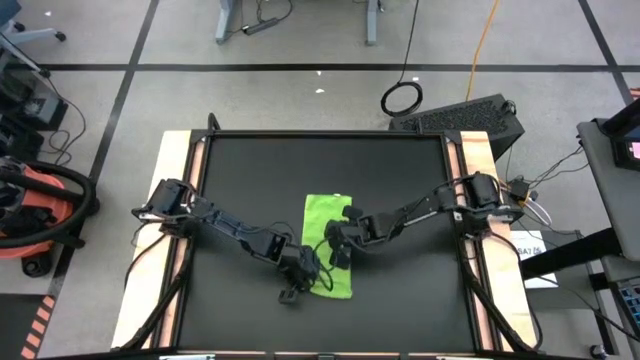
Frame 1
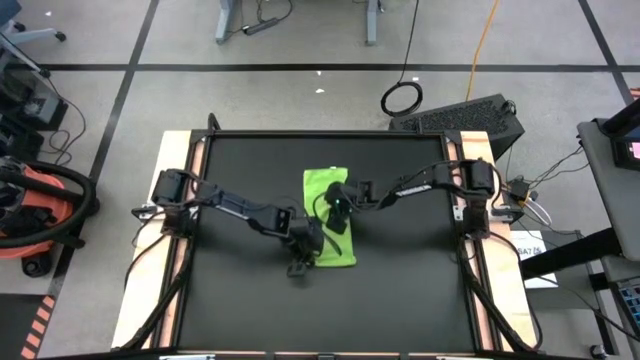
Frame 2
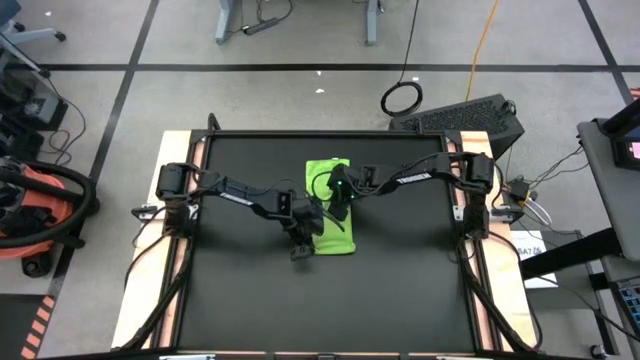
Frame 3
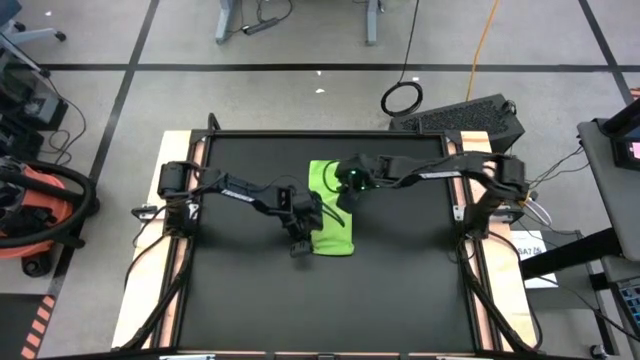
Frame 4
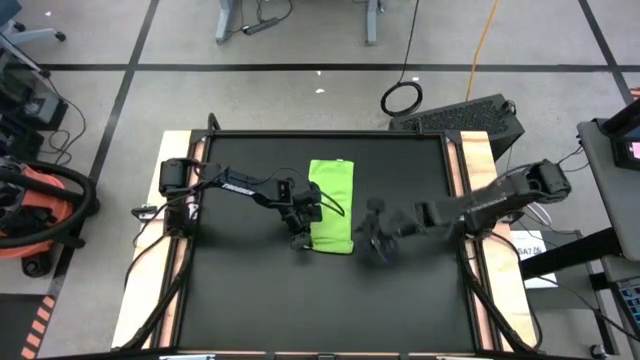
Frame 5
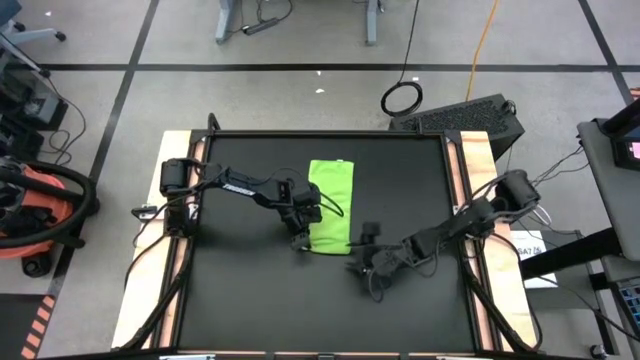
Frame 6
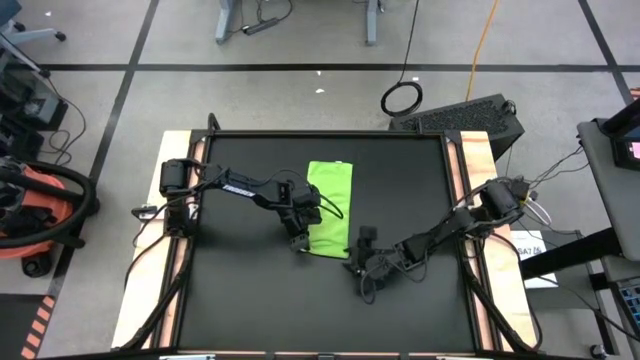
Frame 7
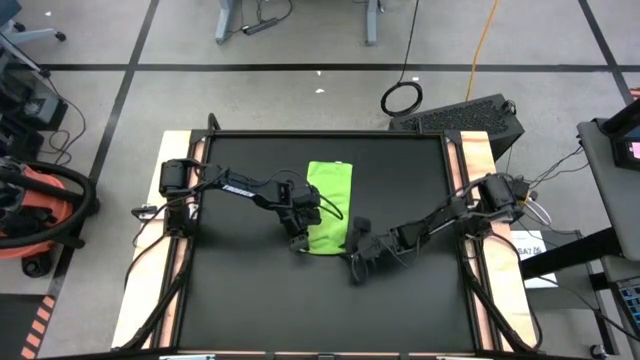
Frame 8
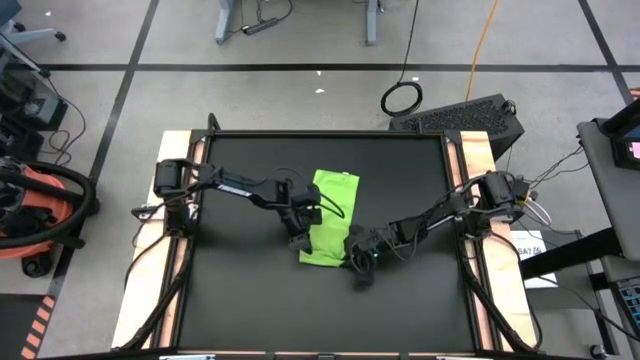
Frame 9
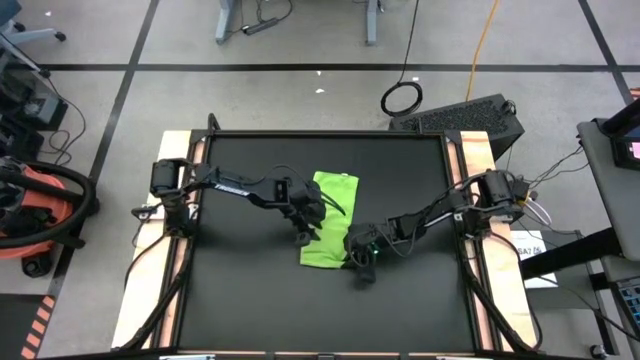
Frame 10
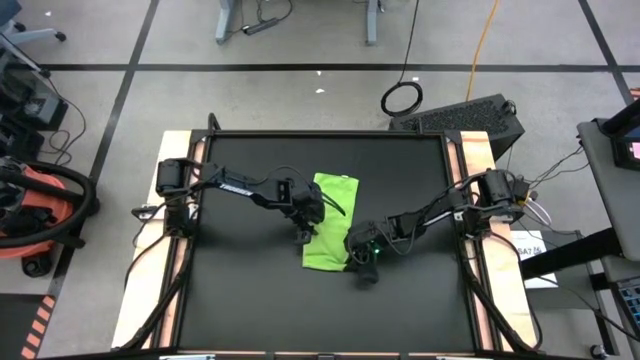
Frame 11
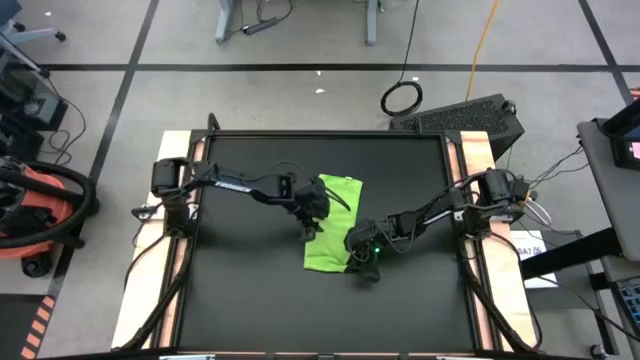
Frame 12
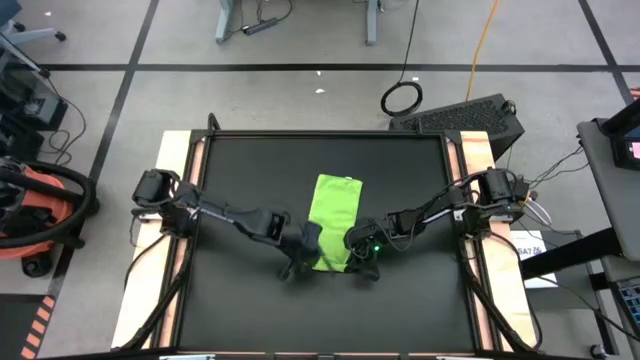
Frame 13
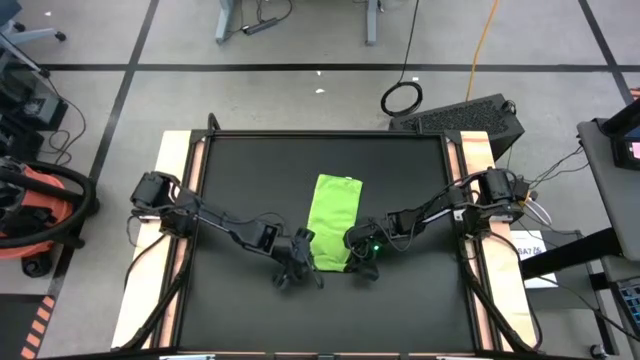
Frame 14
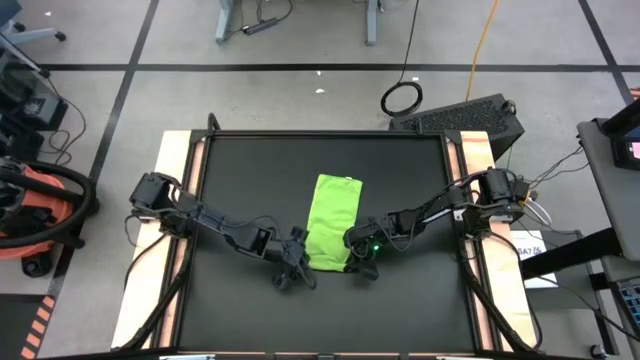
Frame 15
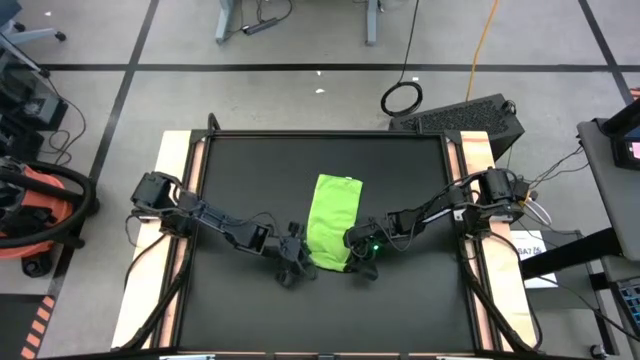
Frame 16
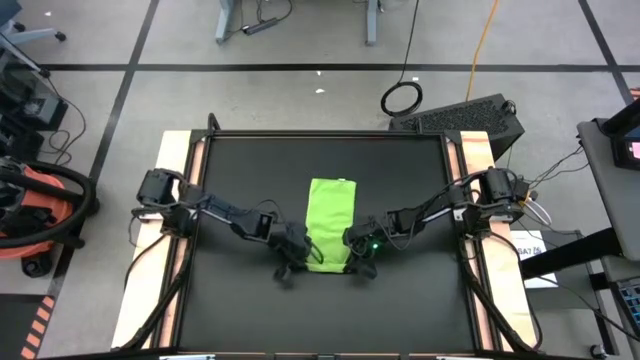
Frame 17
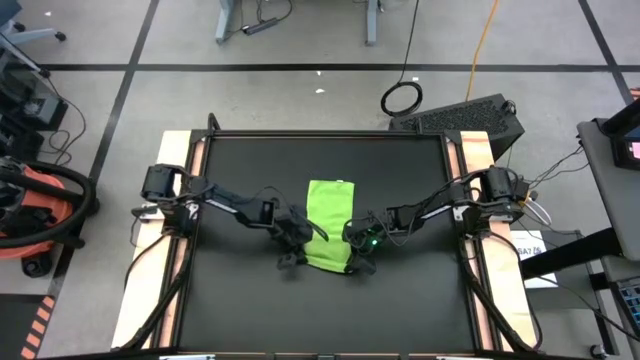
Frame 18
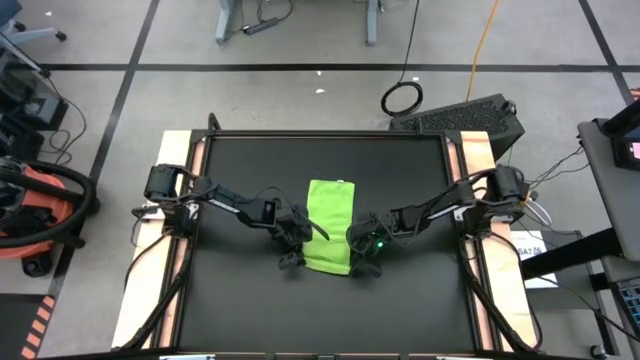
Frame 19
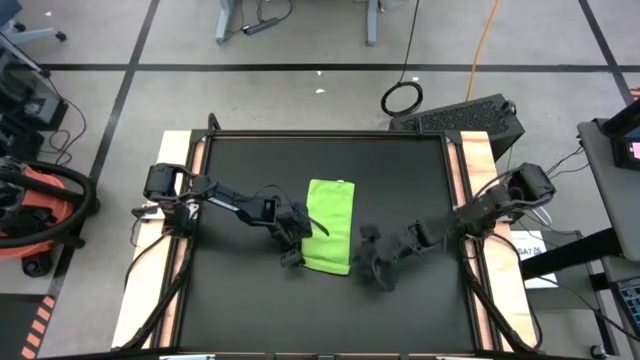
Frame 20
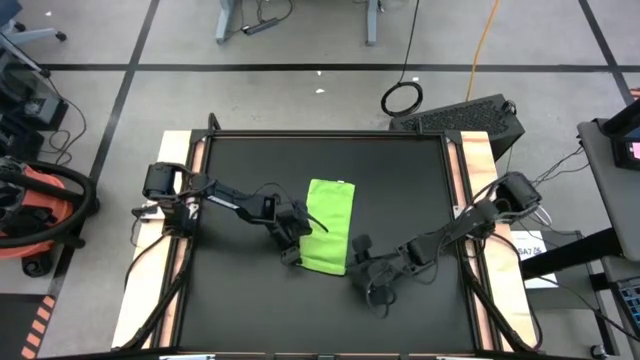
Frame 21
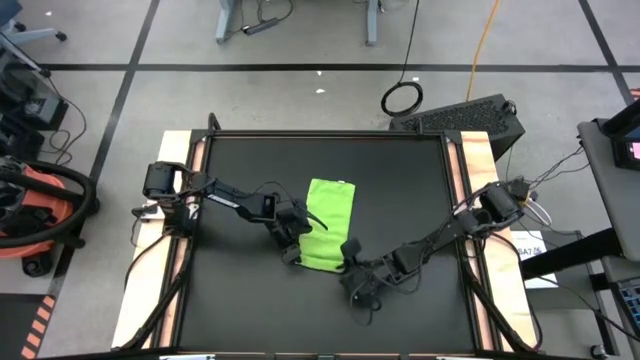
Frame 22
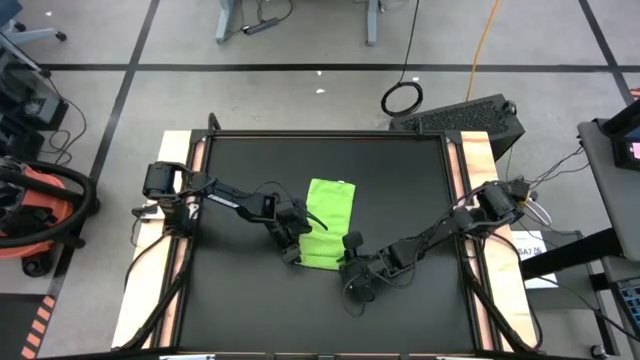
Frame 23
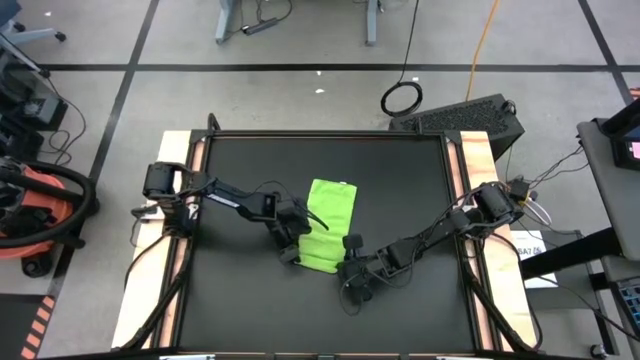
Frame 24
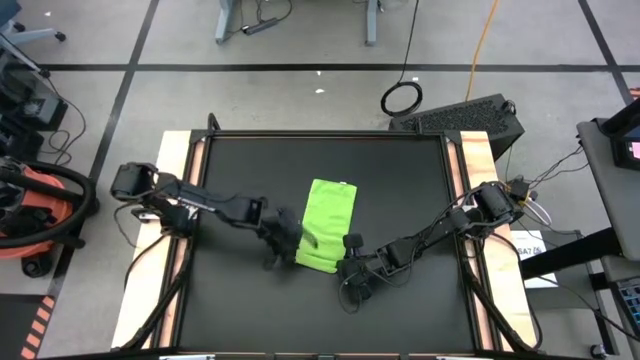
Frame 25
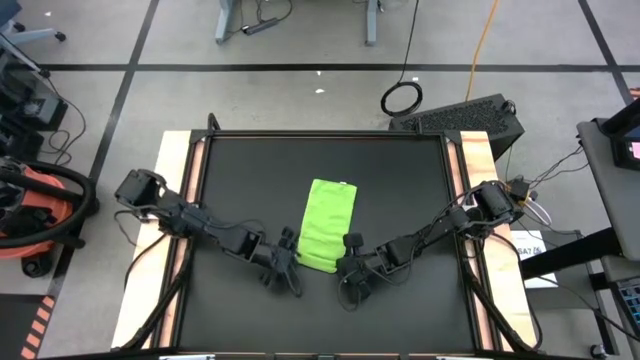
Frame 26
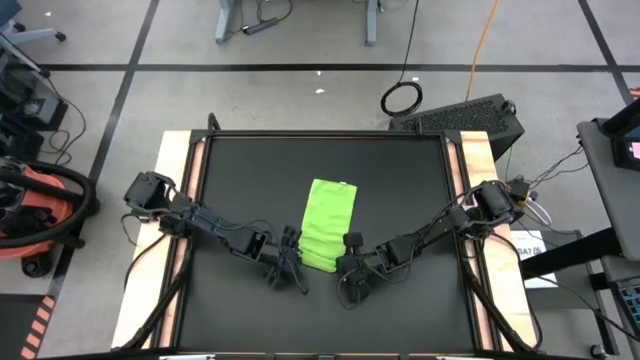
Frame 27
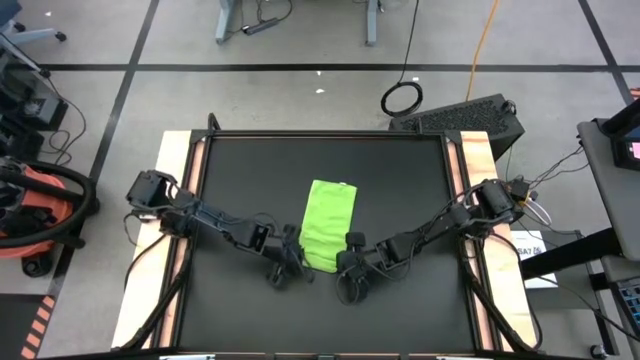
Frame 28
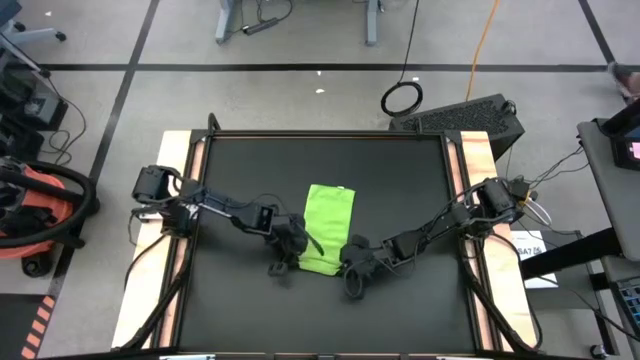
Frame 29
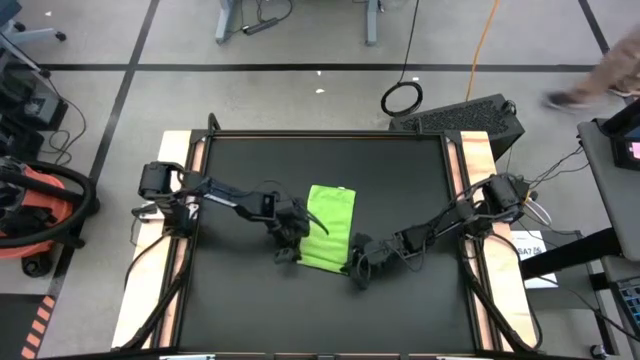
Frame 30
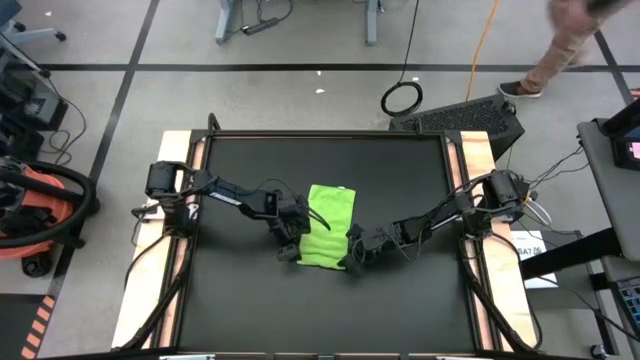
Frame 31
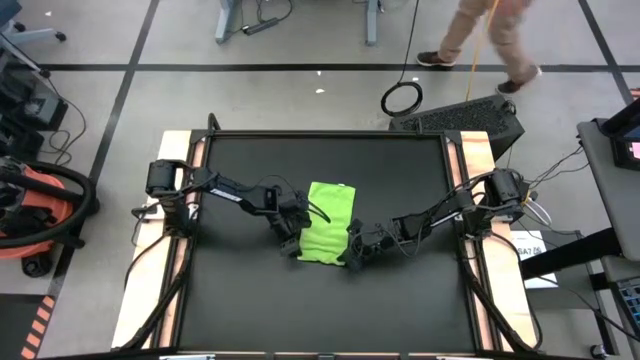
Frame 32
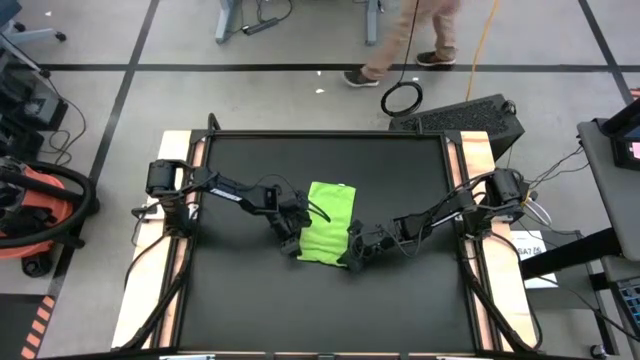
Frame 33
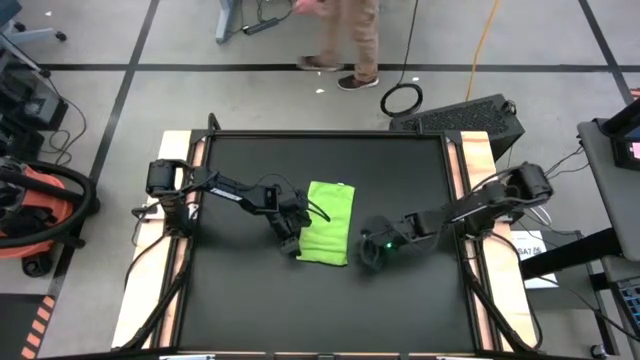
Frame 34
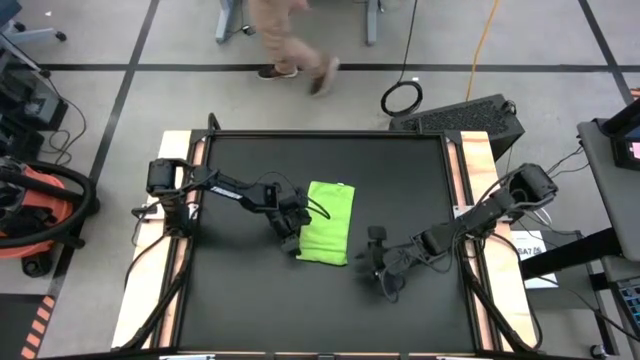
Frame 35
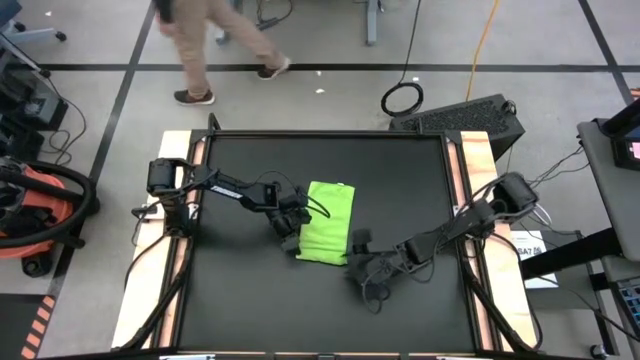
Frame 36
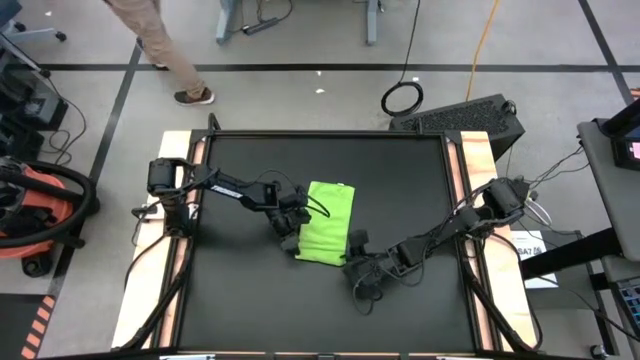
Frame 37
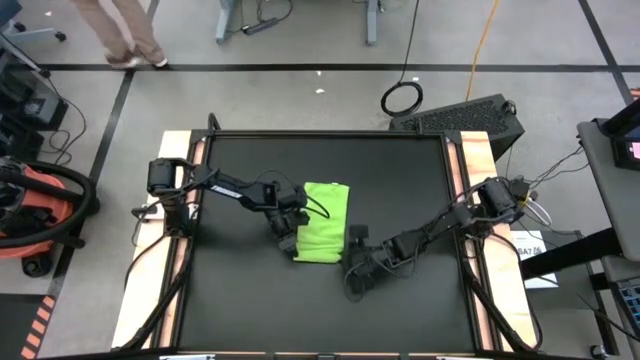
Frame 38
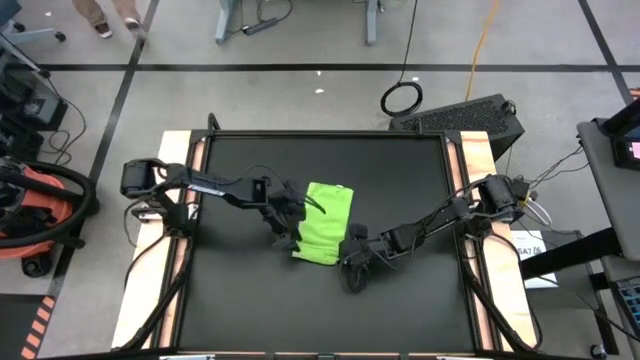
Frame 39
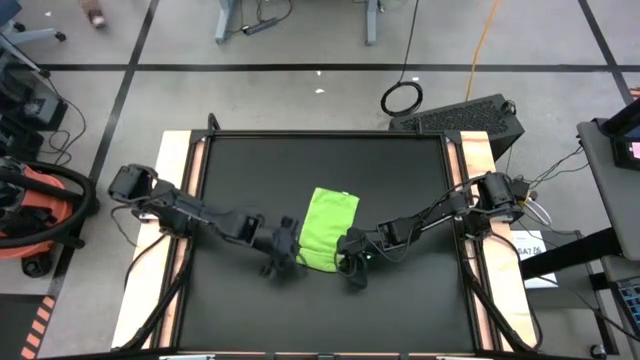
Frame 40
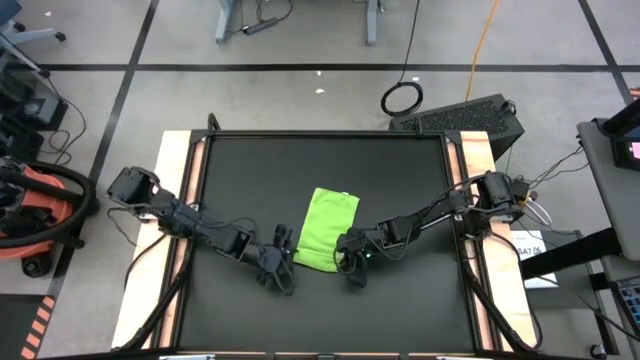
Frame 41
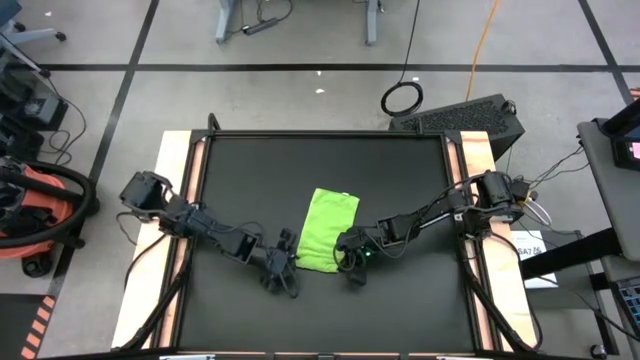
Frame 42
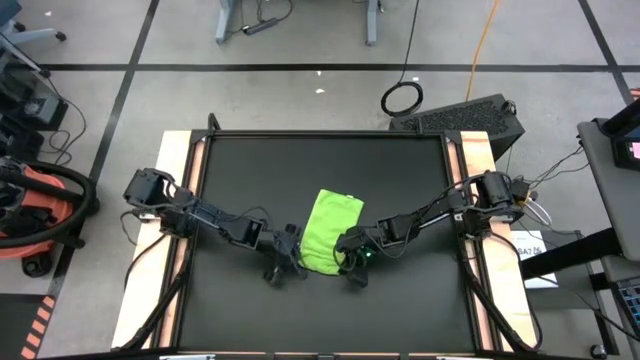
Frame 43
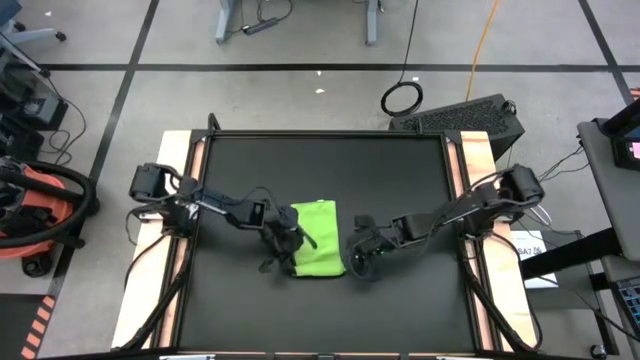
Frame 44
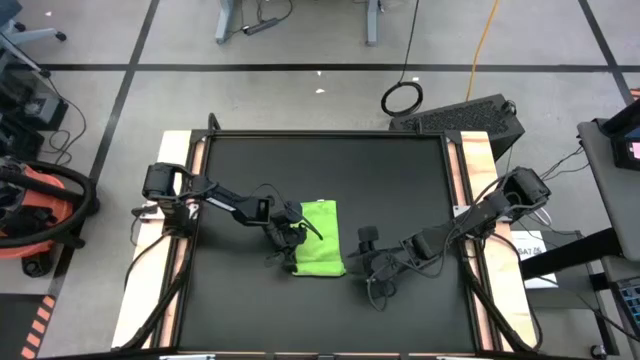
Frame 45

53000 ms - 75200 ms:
Task: Roll towel
Roll the green microfiber cloth
